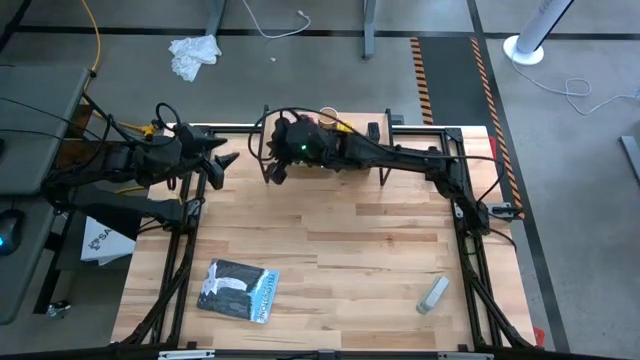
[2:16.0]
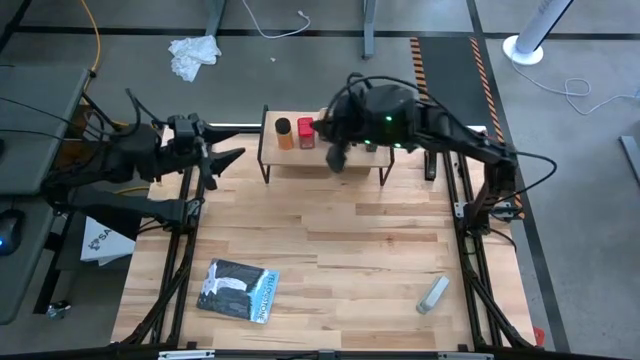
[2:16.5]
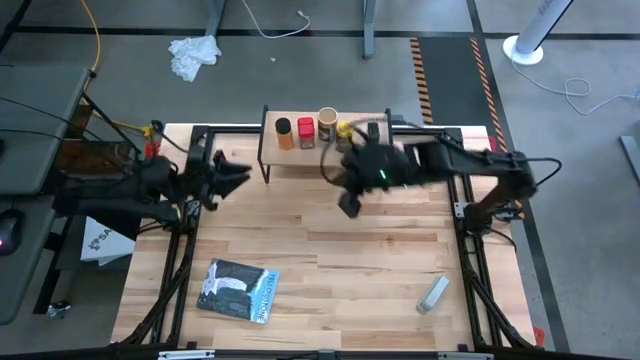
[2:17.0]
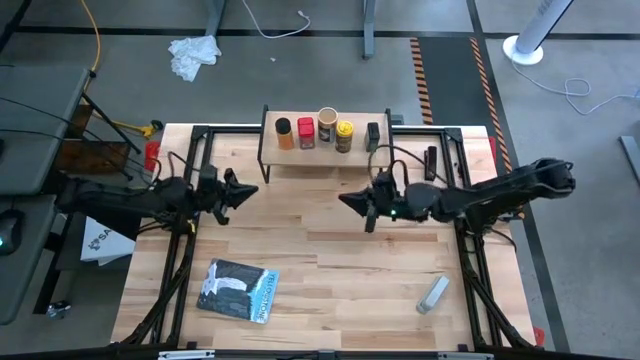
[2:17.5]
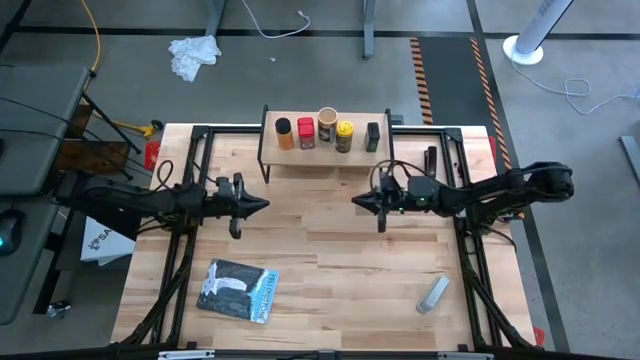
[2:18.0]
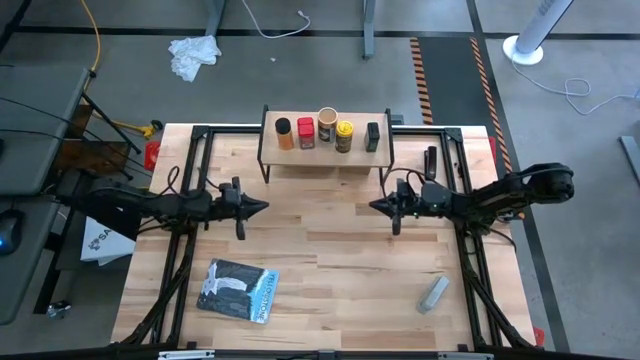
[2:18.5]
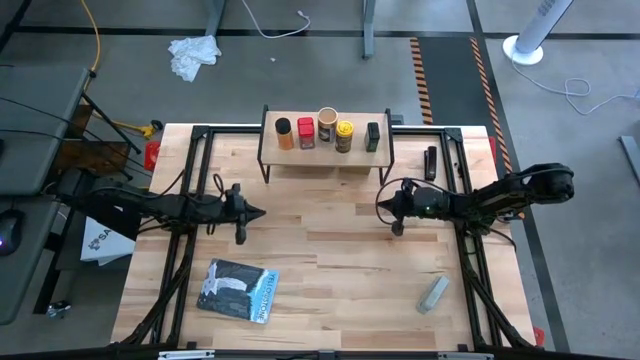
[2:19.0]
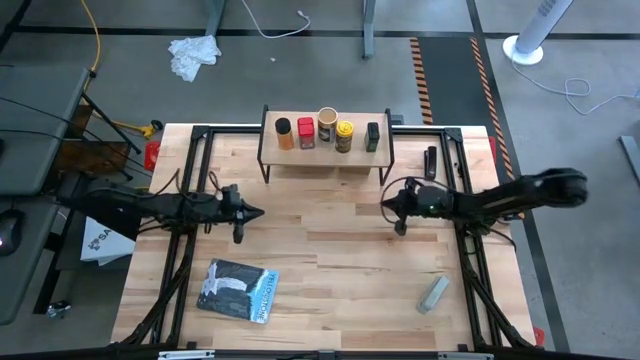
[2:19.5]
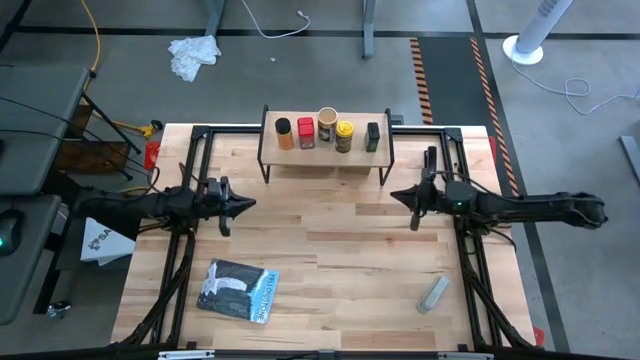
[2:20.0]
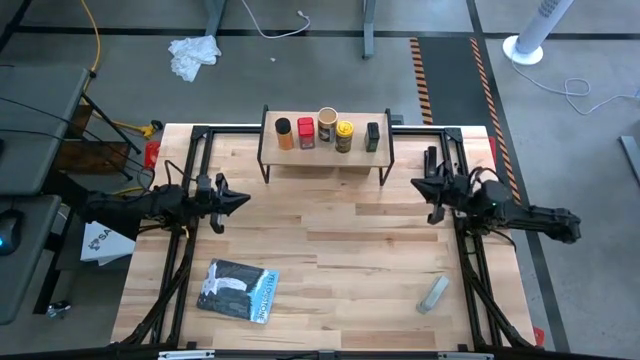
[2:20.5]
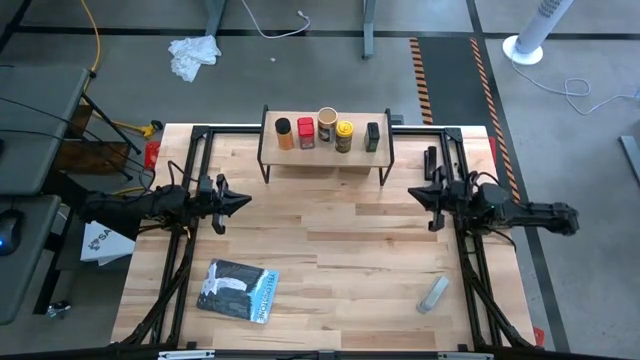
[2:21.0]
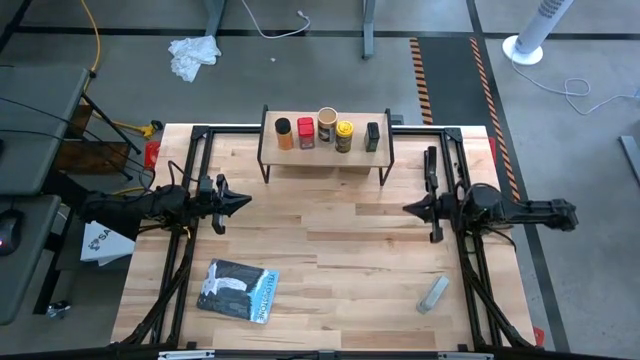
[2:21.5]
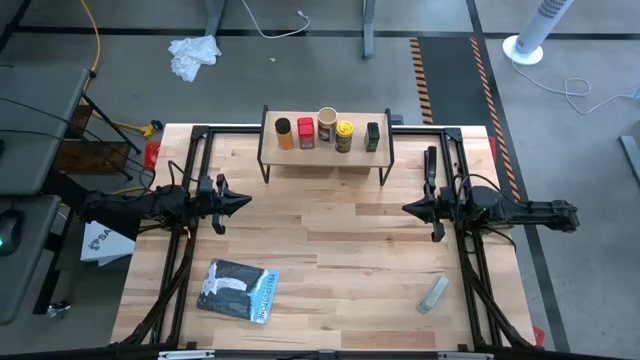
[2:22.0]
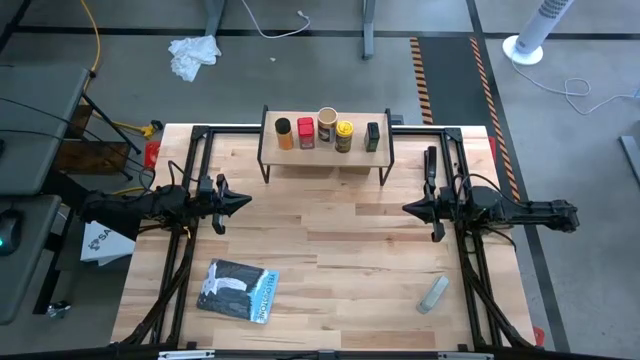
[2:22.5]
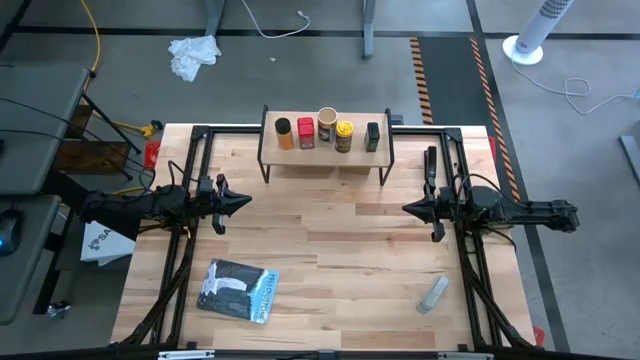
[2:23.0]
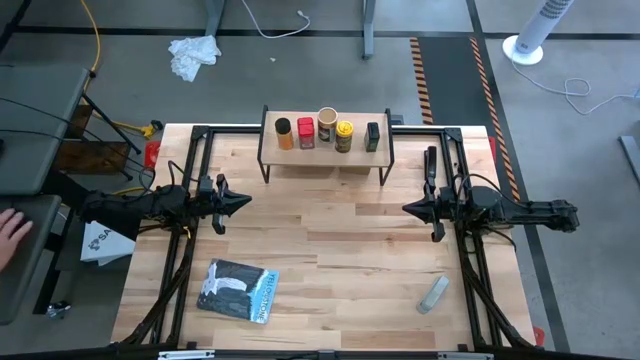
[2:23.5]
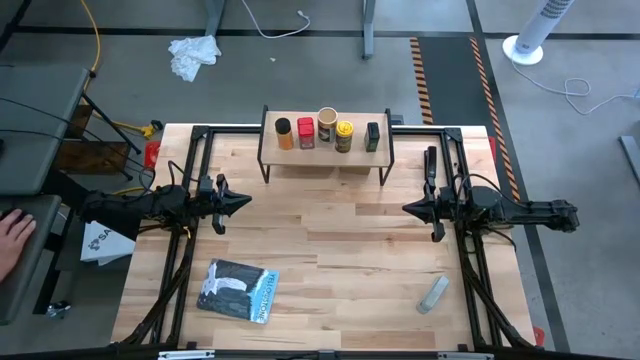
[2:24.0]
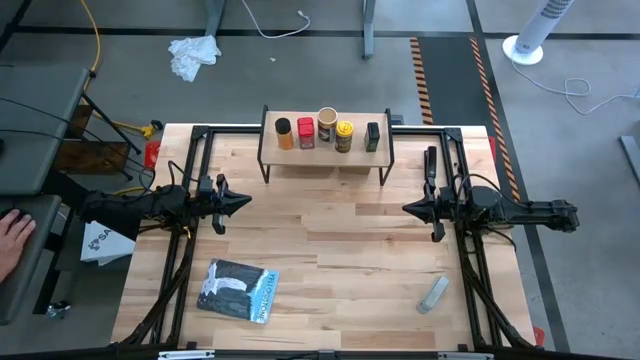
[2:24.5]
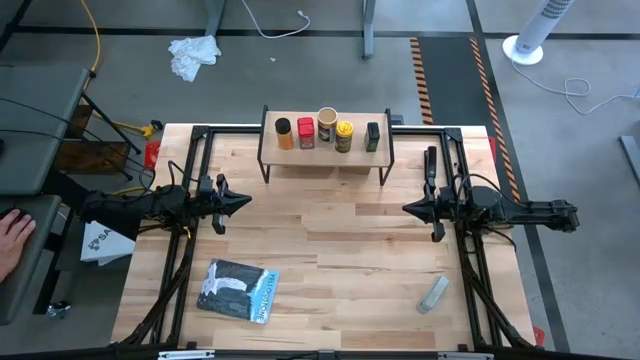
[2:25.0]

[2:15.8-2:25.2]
Task: Shelf spices
Return to Home Position

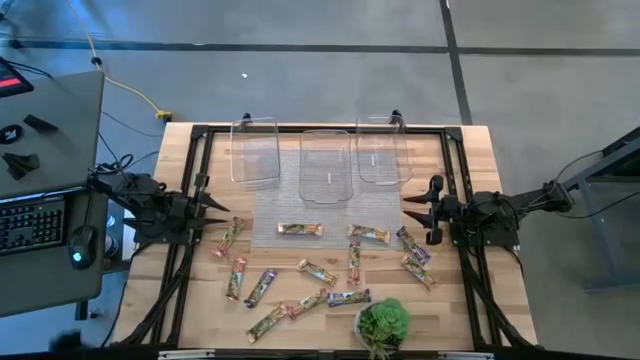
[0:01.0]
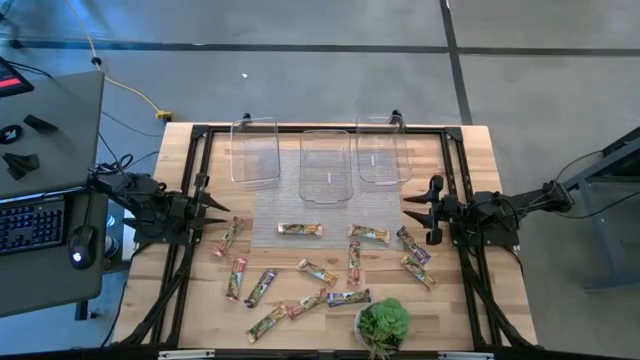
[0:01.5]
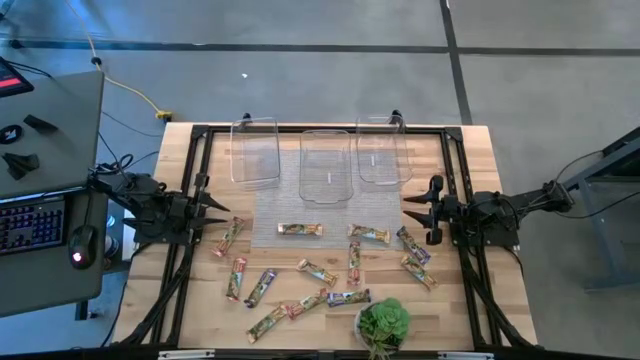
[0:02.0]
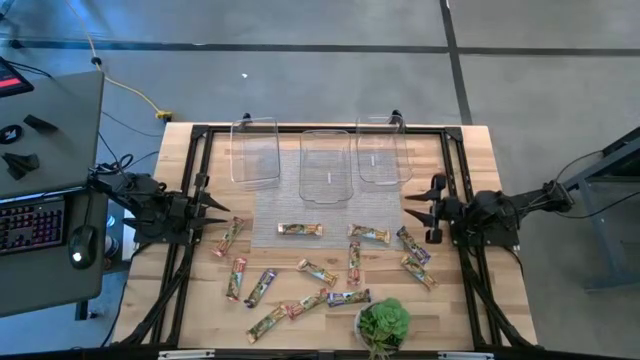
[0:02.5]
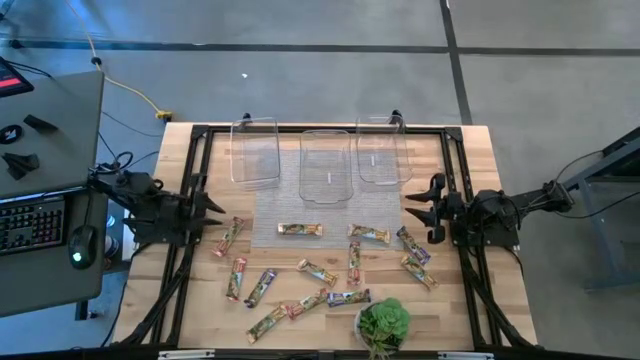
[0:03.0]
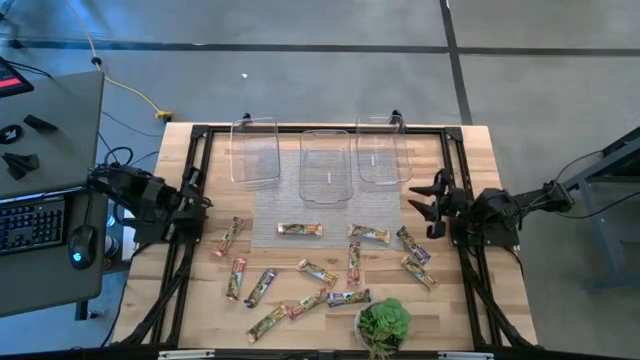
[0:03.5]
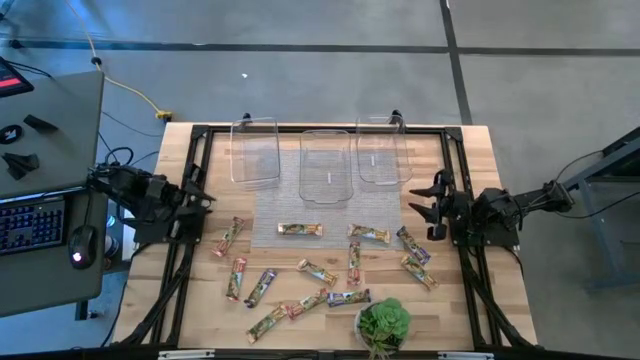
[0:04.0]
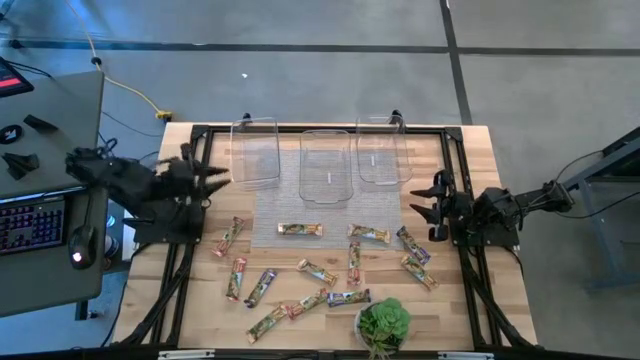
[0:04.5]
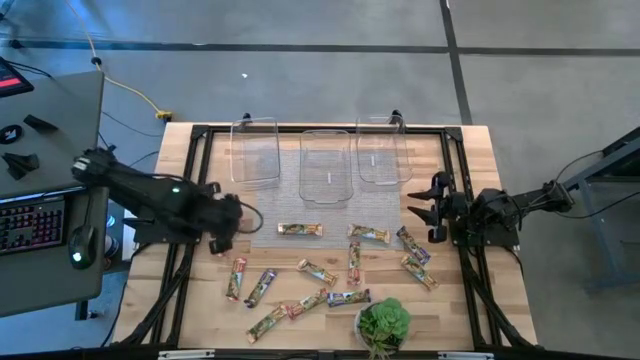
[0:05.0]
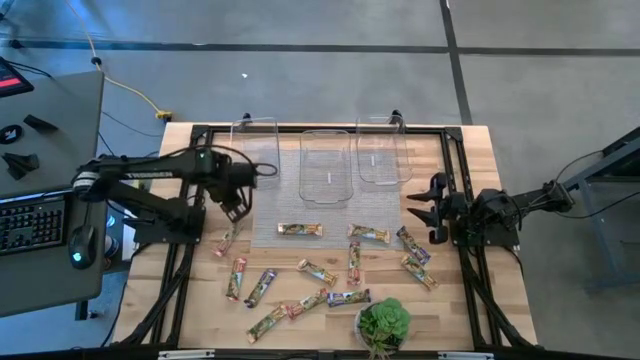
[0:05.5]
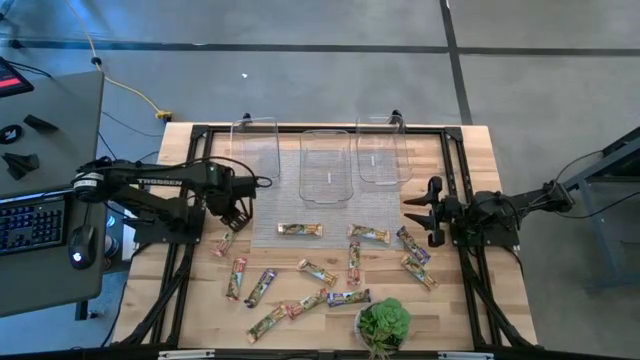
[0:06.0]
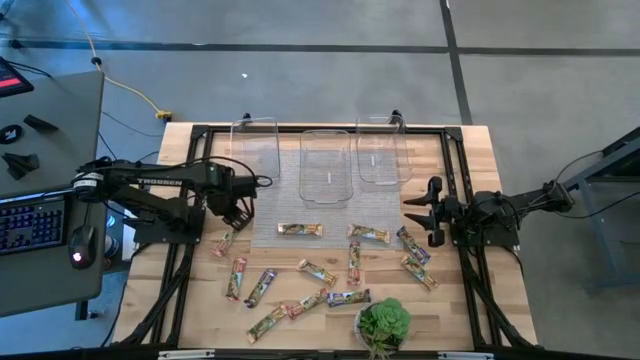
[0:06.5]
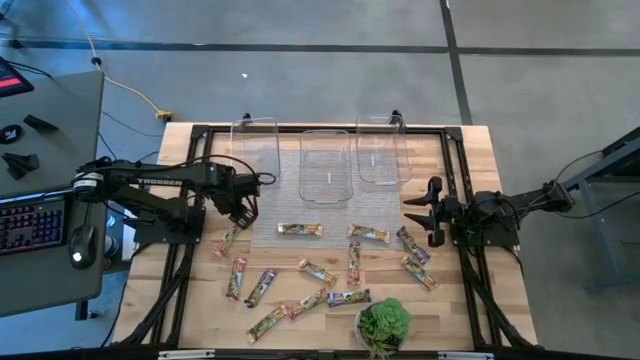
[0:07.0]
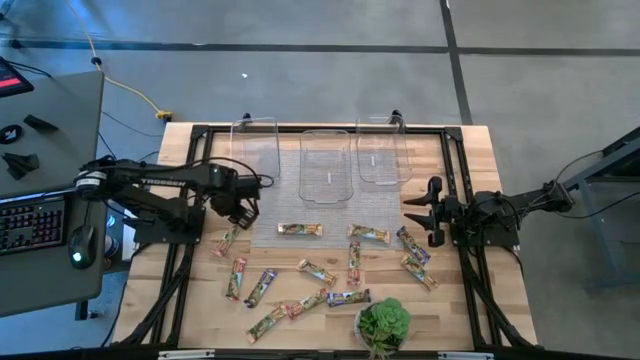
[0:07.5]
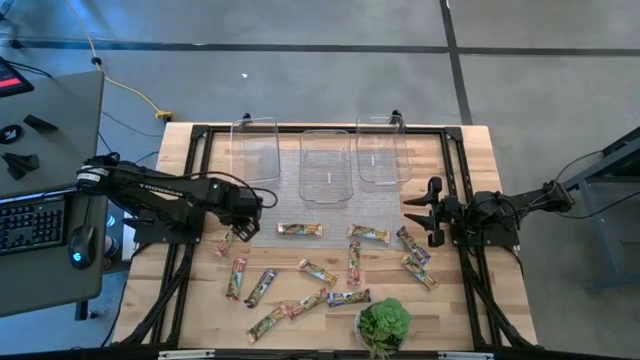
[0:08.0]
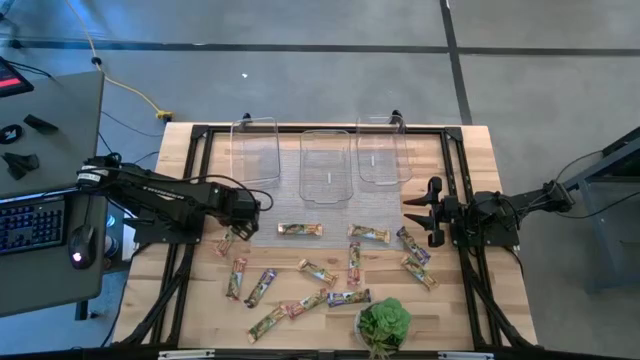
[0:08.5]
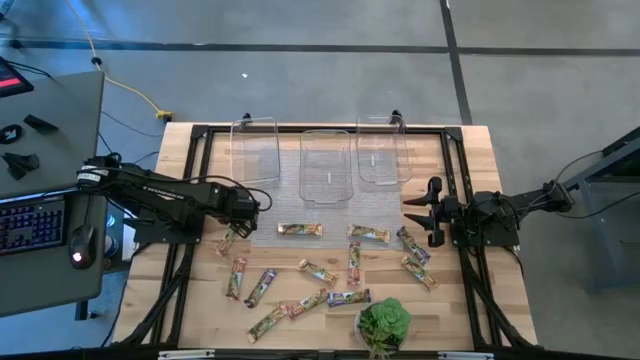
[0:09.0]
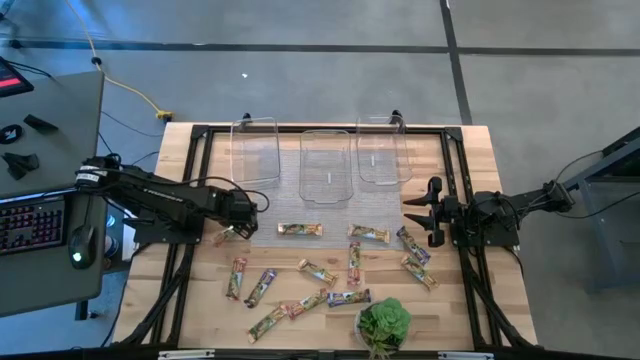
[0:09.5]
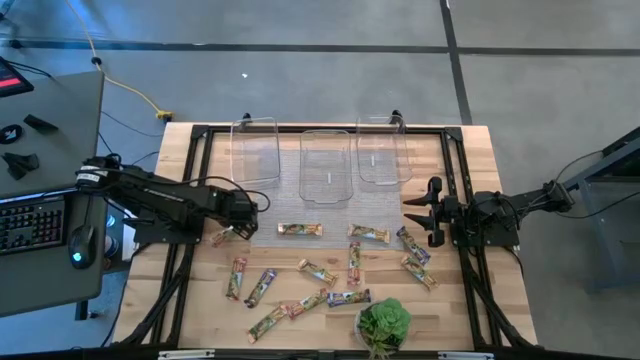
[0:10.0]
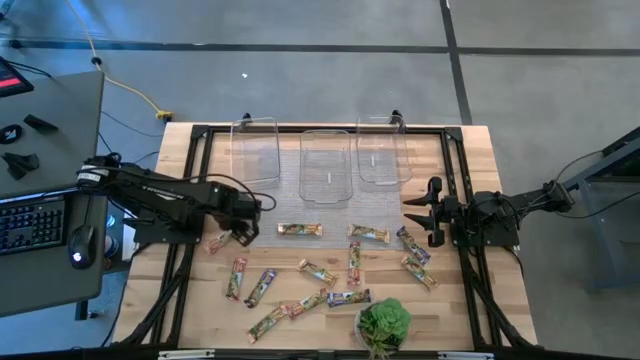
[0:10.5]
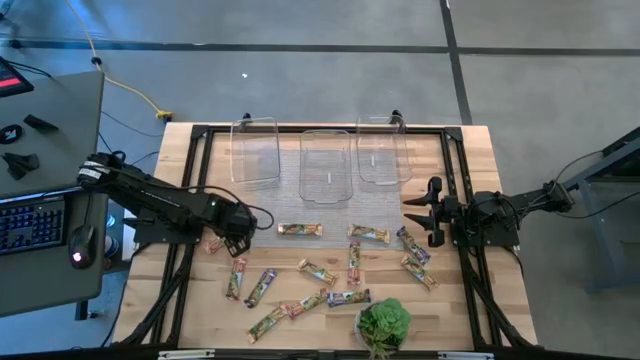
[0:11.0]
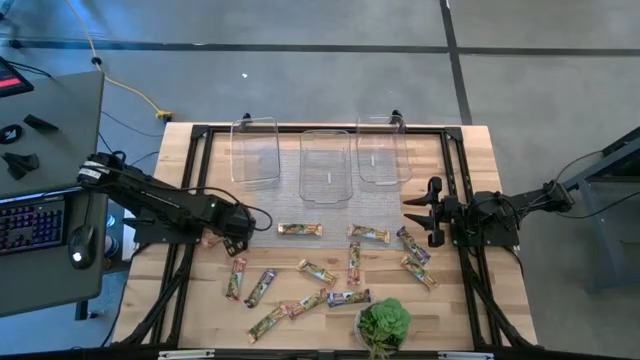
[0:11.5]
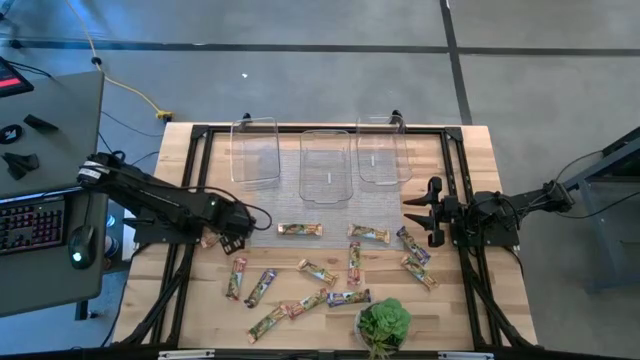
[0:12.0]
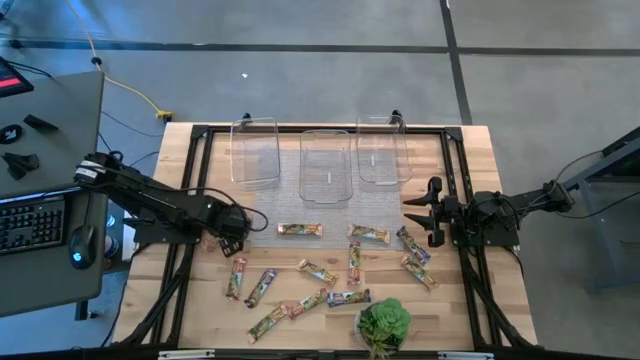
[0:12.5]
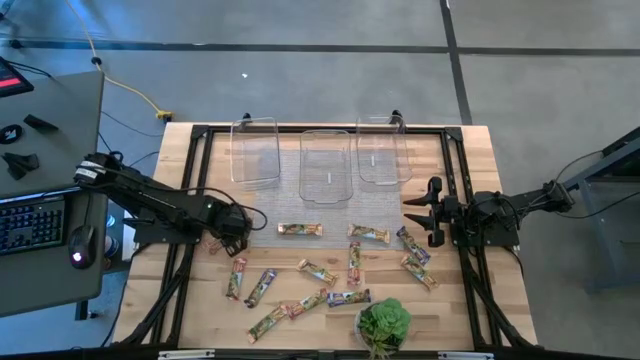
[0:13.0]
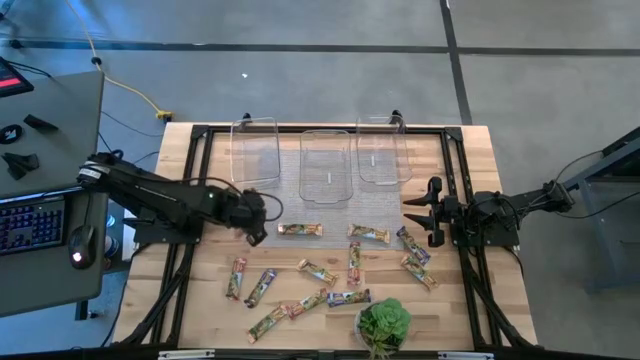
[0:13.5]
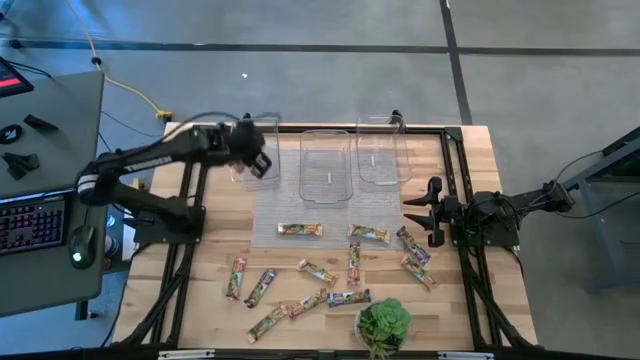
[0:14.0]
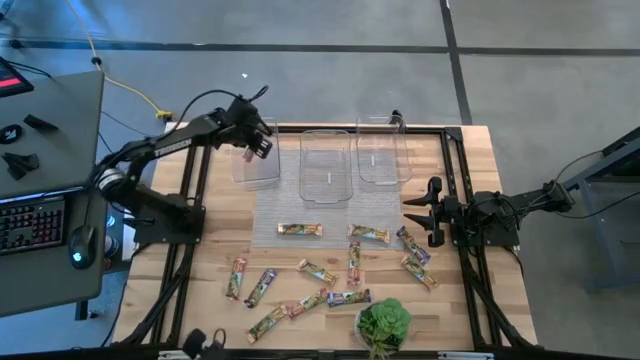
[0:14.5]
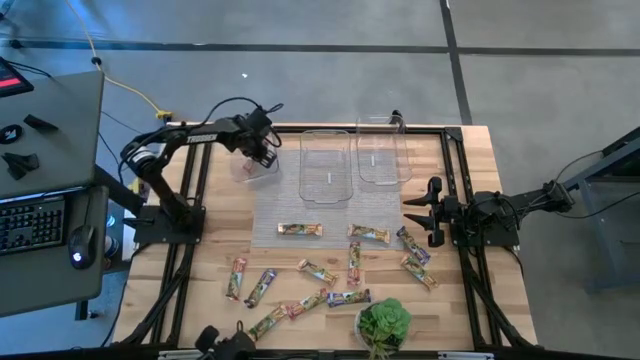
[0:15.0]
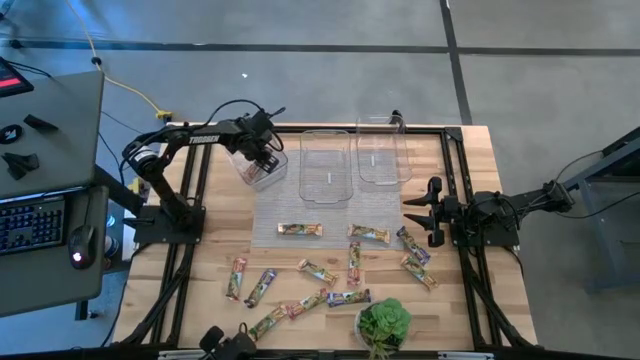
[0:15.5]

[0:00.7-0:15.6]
Task: Pick and place Granola Bars by type
Put the red granola bar into the left transparent bin
